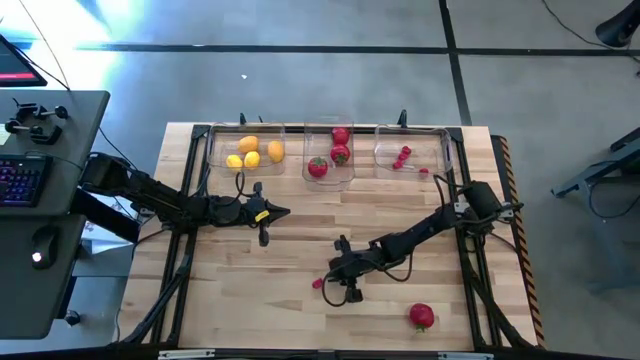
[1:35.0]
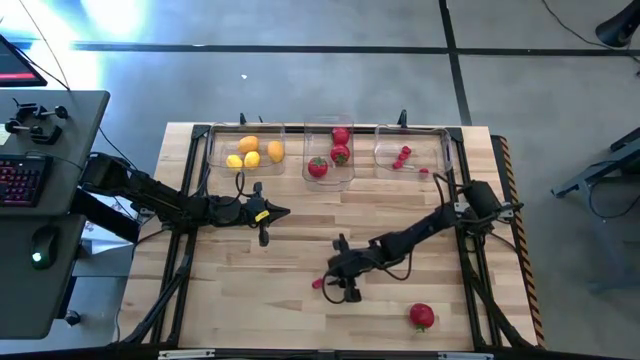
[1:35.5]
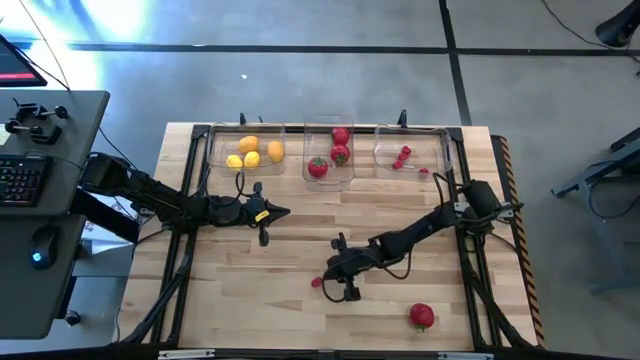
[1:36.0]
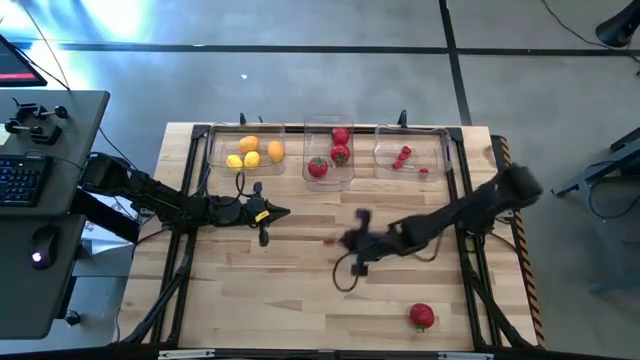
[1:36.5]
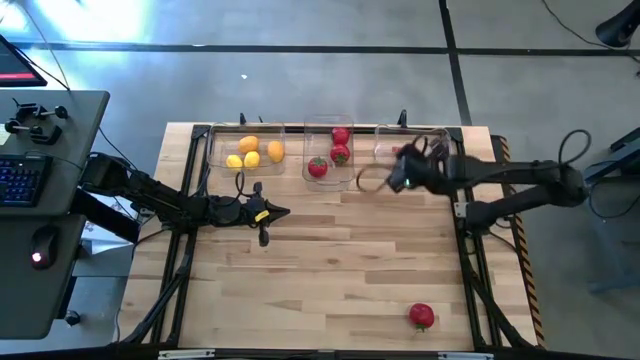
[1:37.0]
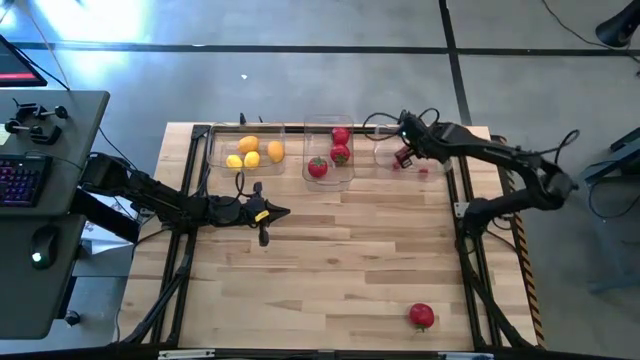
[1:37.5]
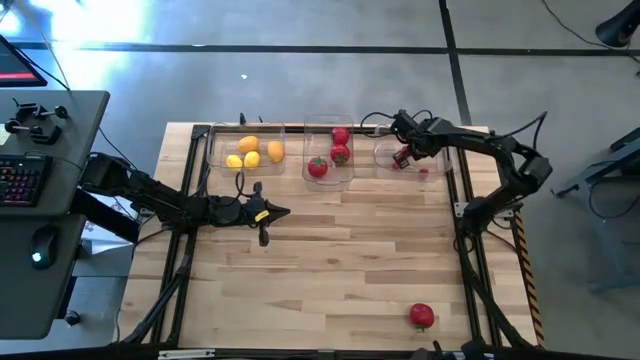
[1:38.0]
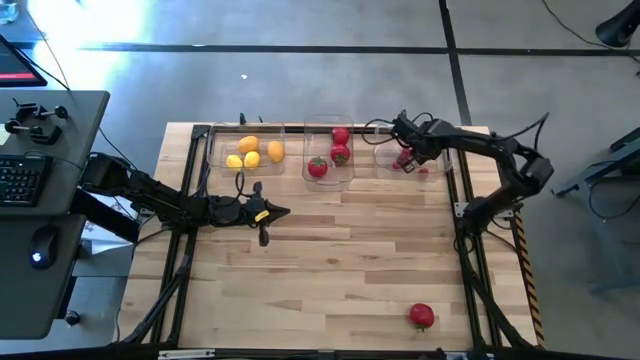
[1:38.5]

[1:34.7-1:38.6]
Task: Sort produce into baskets
Put the chili pepper into the right transparent bin

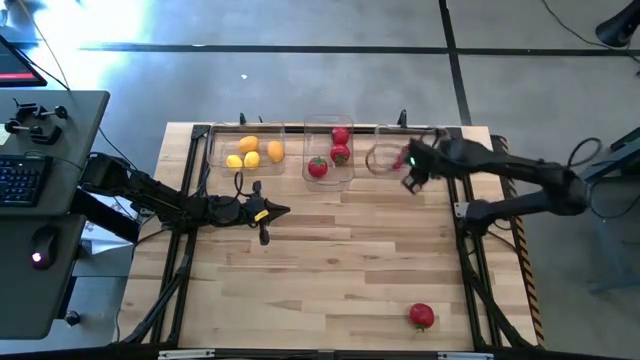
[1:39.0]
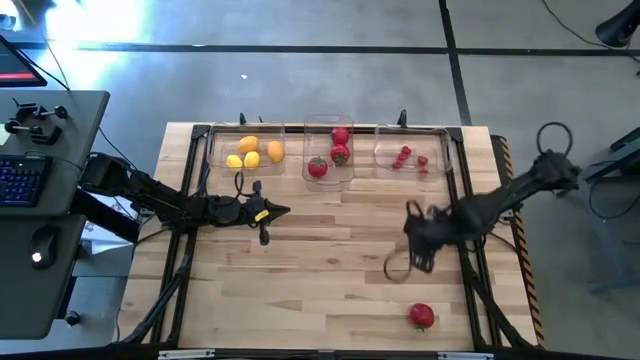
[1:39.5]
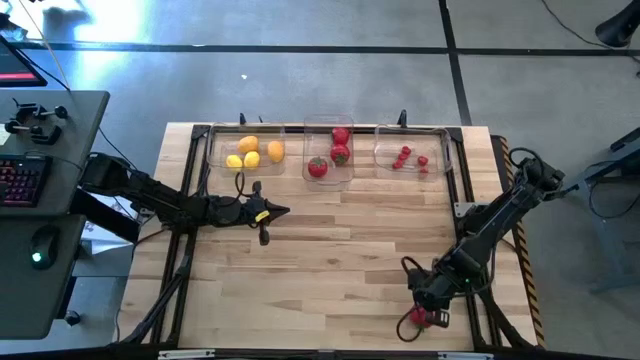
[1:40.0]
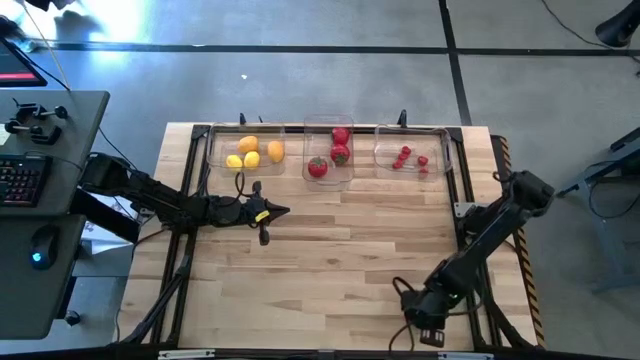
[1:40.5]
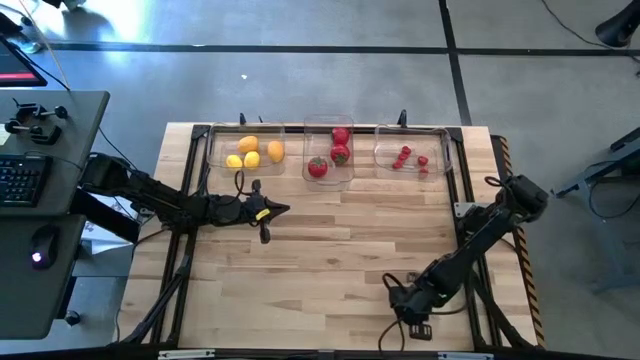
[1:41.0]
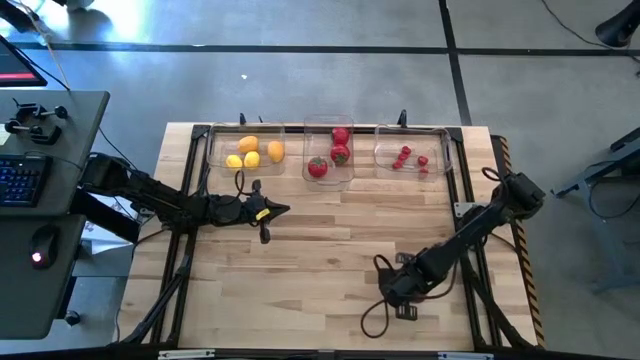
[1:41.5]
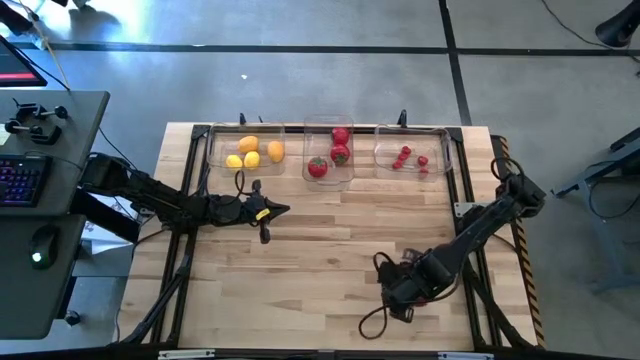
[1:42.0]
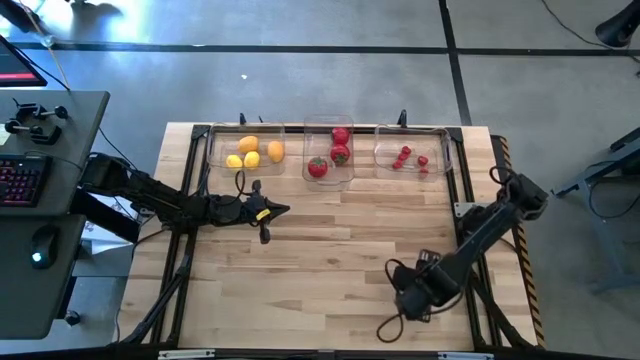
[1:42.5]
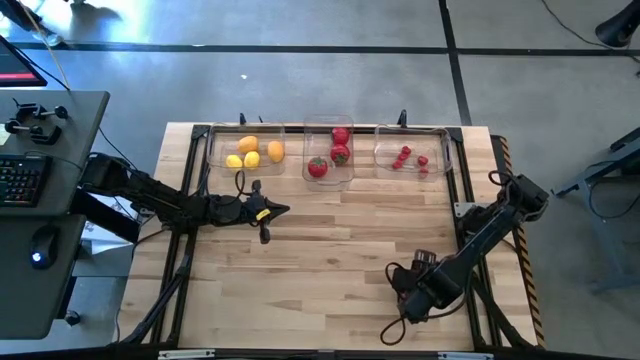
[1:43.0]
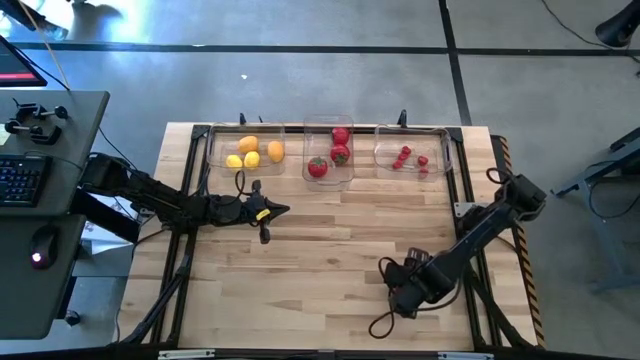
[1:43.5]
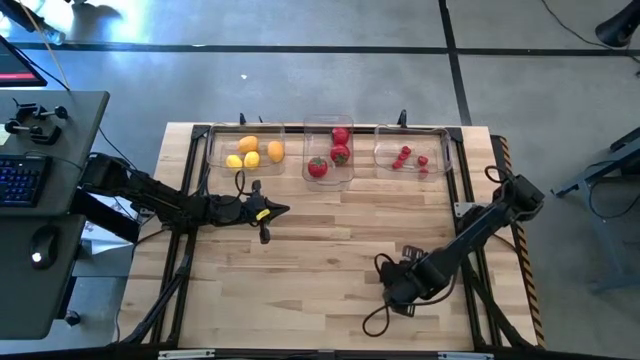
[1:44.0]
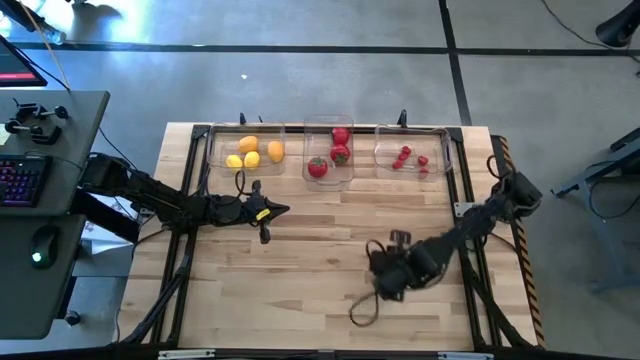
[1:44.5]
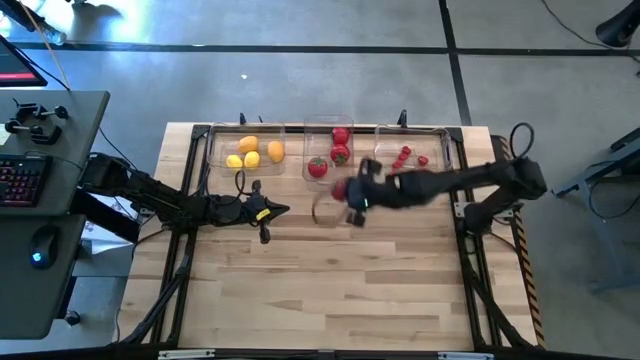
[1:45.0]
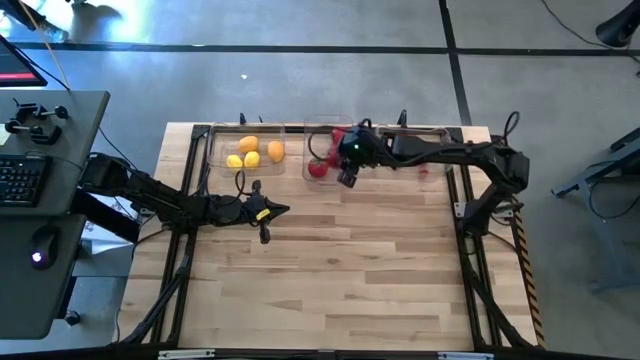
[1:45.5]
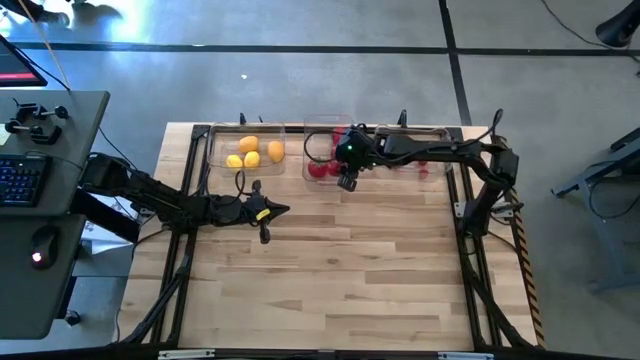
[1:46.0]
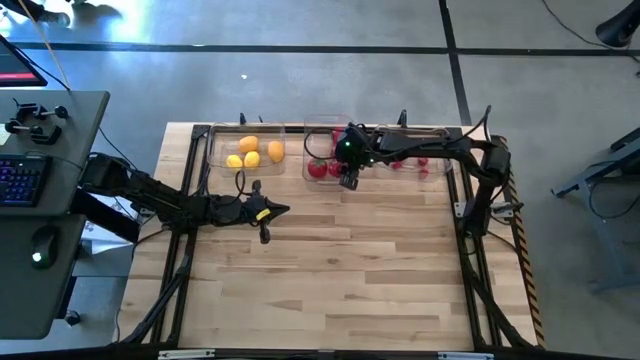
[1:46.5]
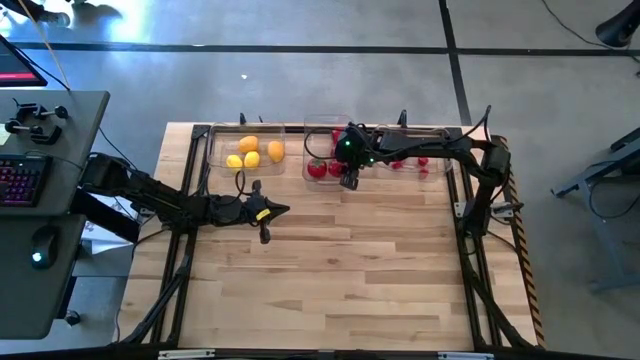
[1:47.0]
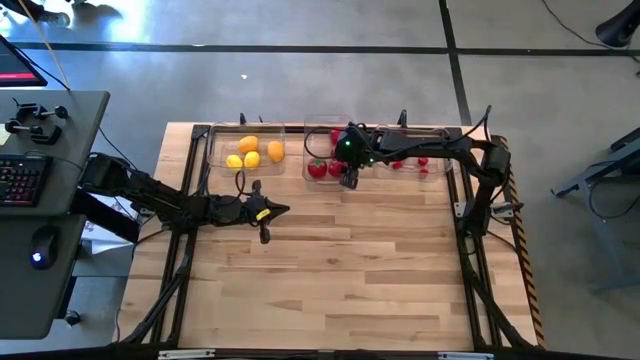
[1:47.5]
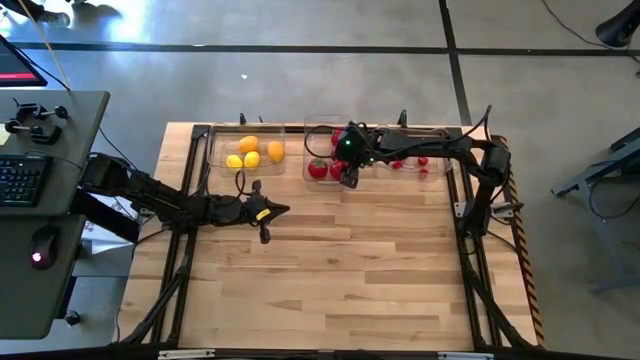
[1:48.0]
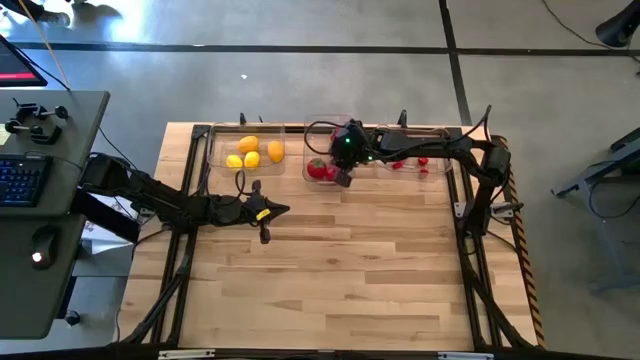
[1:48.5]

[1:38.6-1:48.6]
Put the tomato into the middle transparent bin

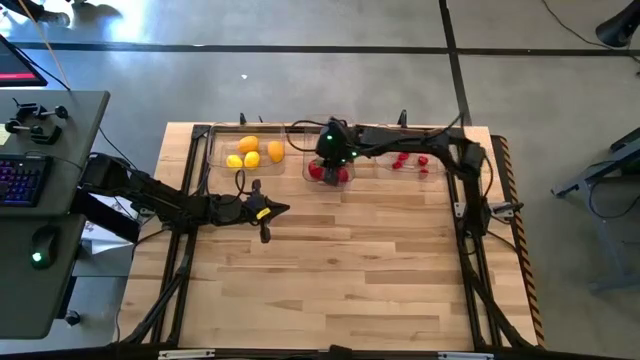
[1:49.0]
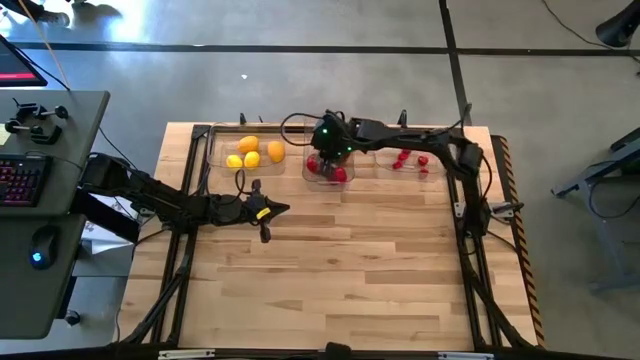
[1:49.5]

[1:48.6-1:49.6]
Adjust the tomato

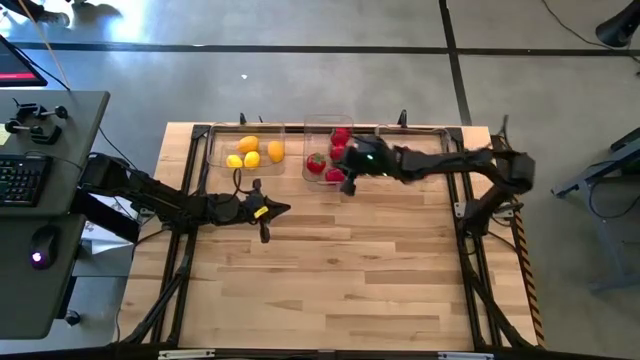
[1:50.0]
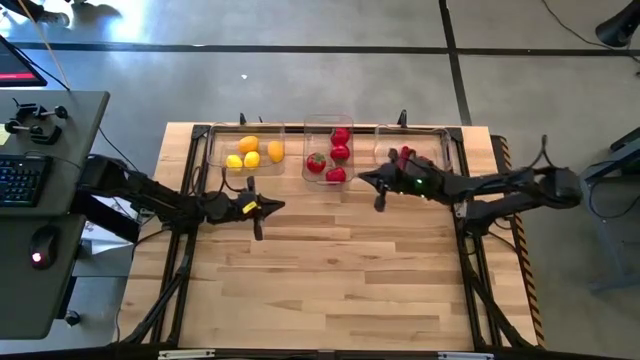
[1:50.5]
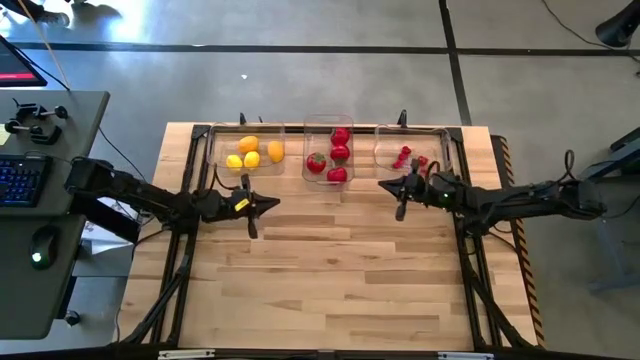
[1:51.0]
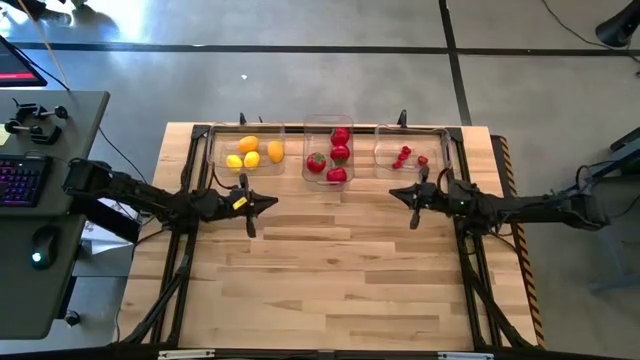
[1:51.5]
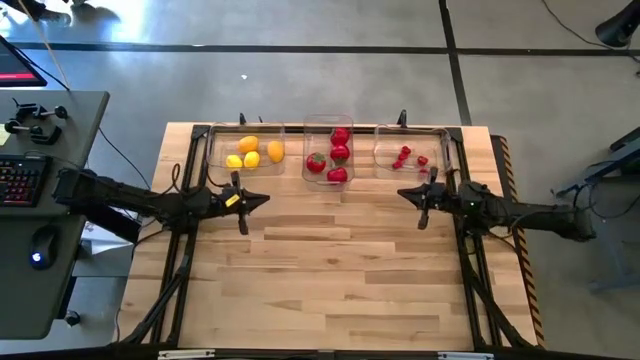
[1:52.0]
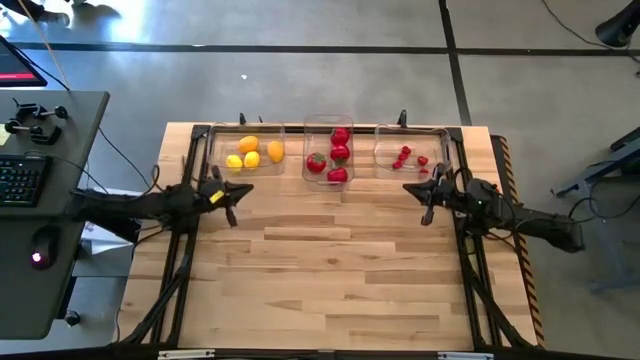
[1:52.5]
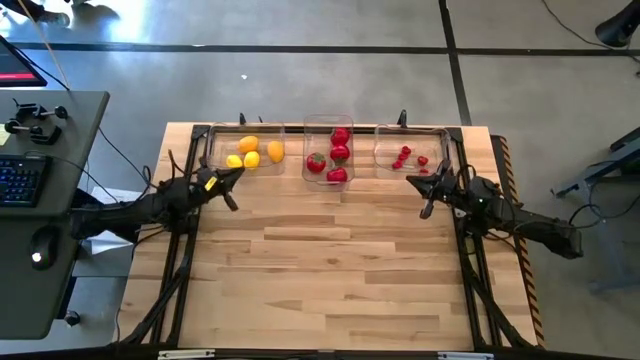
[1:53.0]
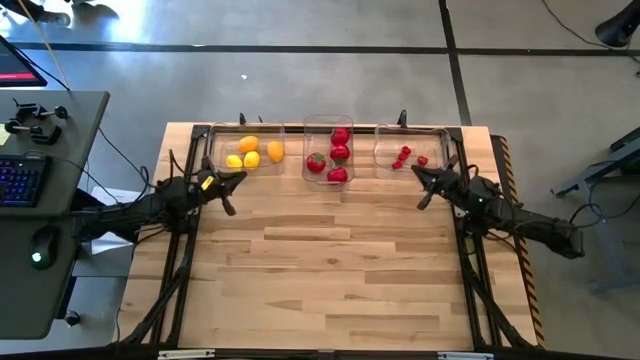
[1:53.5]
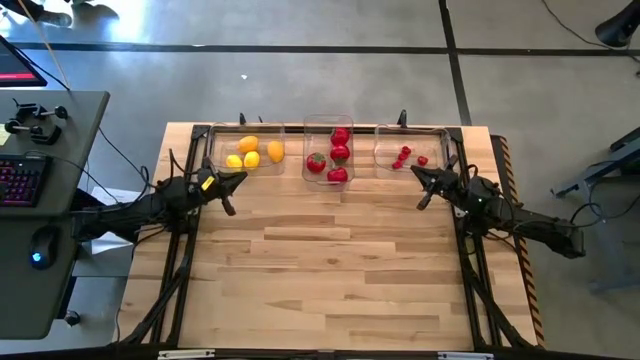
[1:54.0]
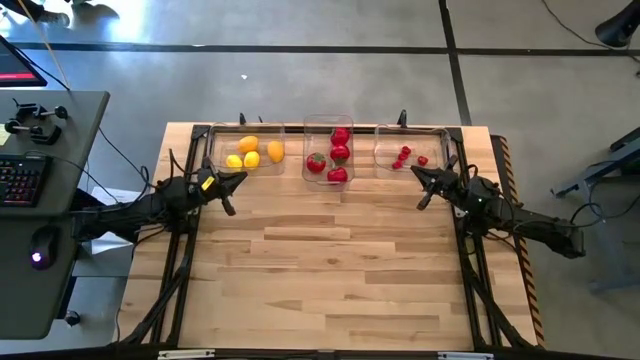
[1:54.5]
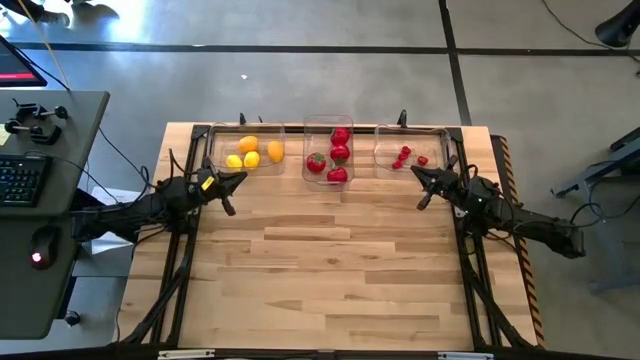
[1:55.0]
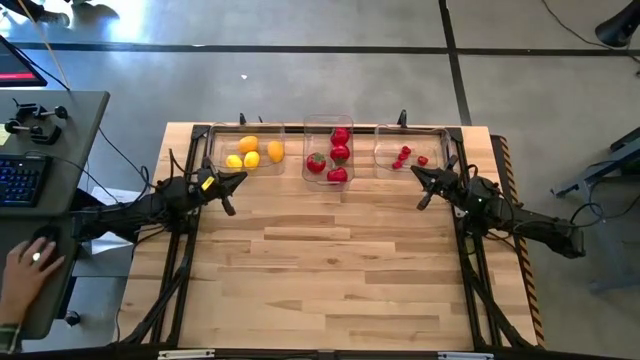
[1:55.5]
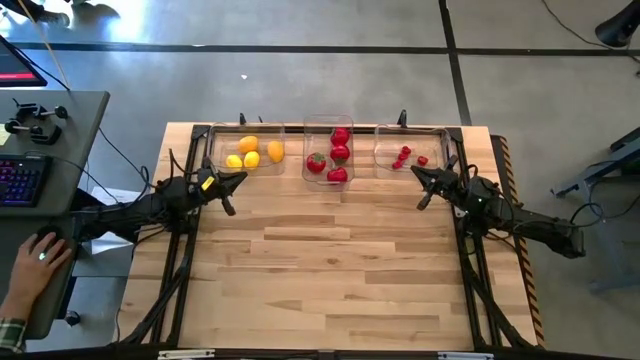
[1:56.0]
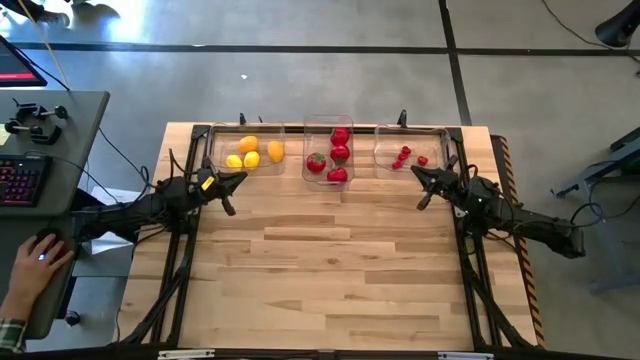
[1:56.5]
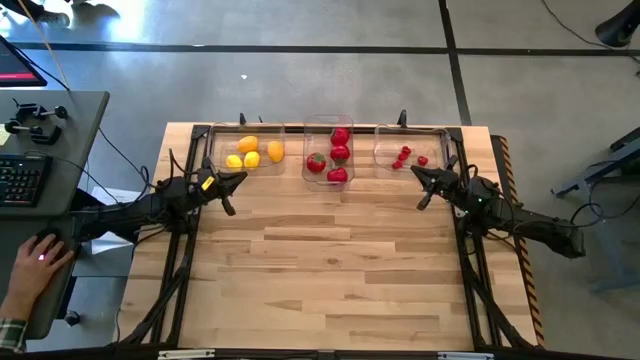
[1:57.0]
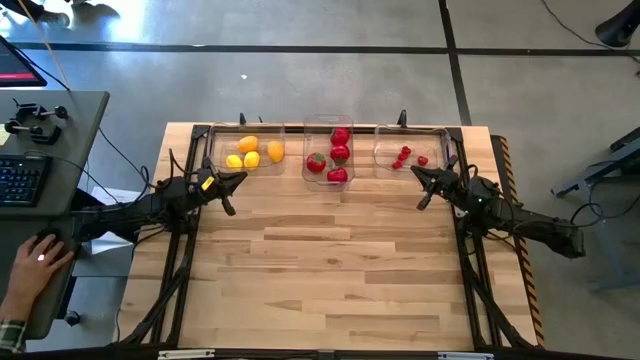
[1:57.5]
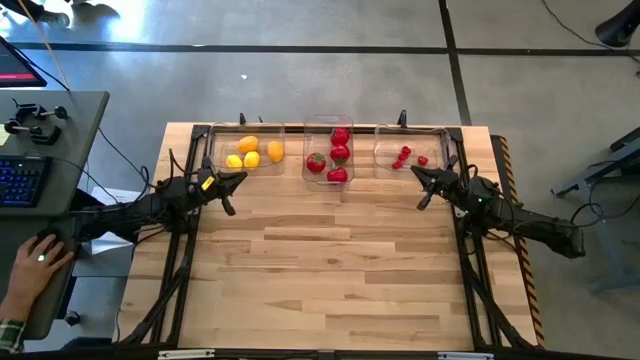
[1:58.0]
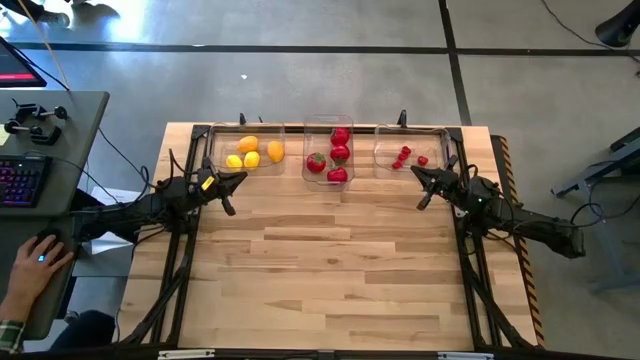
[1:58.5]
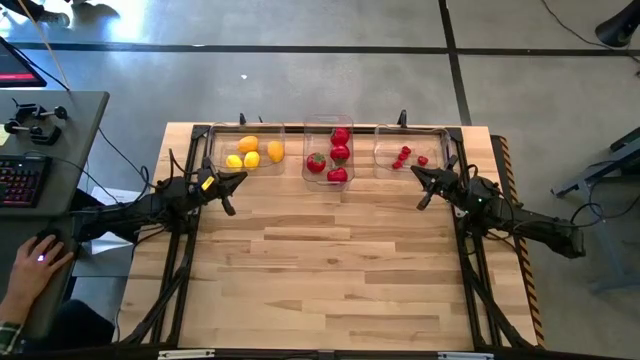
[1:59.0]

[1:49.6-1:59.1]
Return to Home Position
